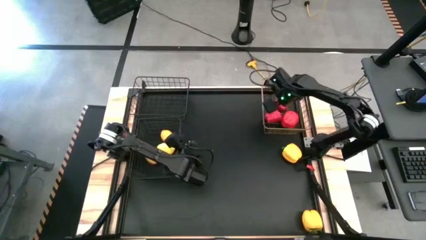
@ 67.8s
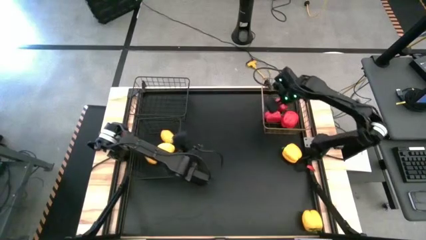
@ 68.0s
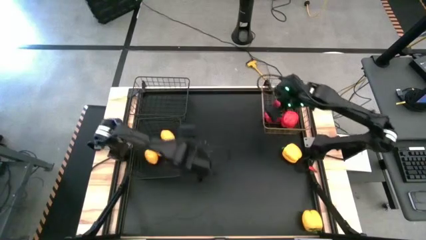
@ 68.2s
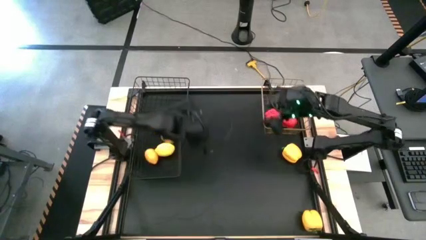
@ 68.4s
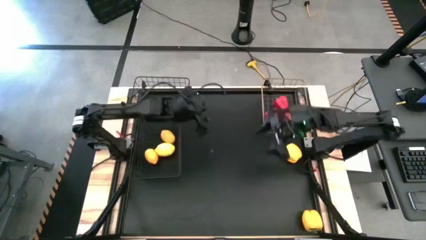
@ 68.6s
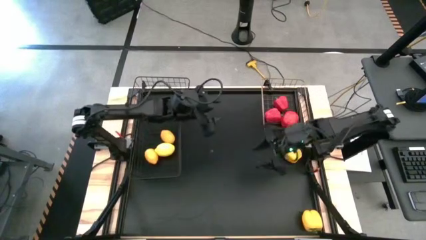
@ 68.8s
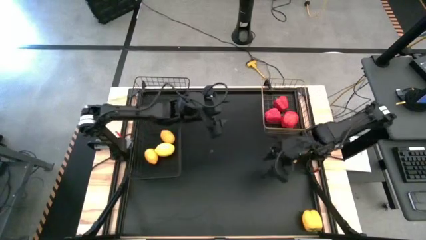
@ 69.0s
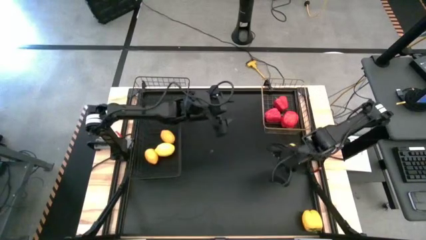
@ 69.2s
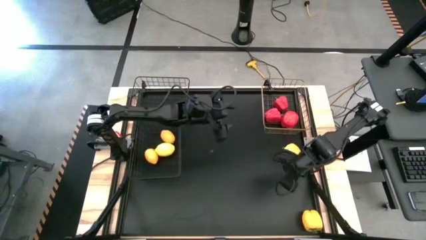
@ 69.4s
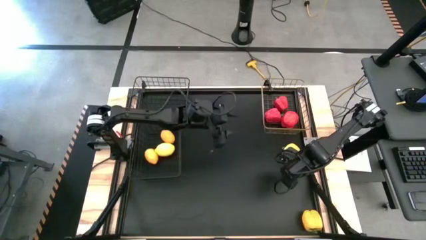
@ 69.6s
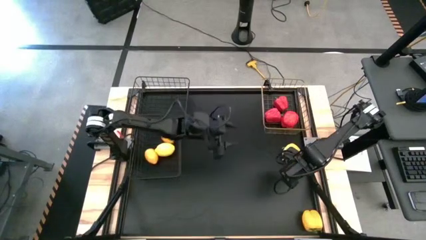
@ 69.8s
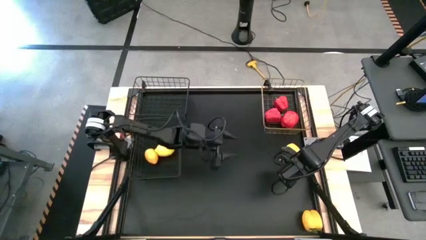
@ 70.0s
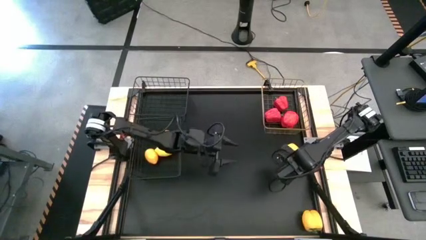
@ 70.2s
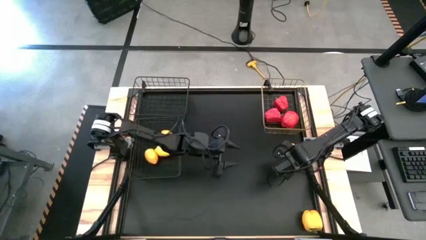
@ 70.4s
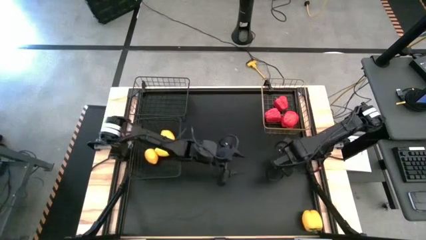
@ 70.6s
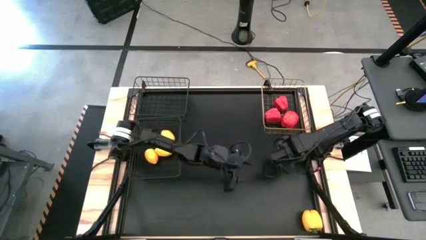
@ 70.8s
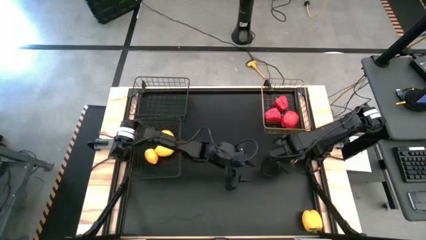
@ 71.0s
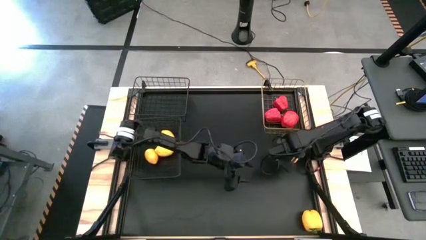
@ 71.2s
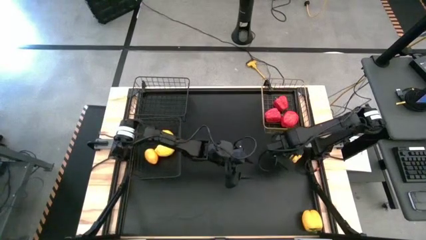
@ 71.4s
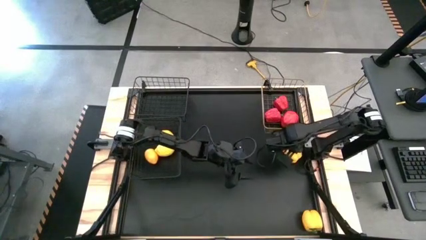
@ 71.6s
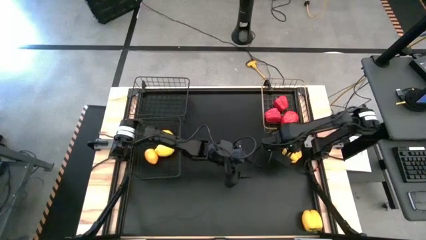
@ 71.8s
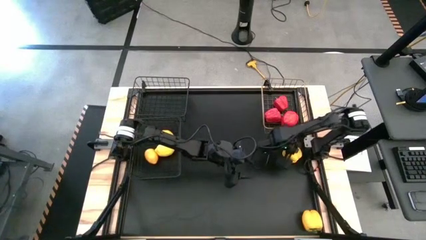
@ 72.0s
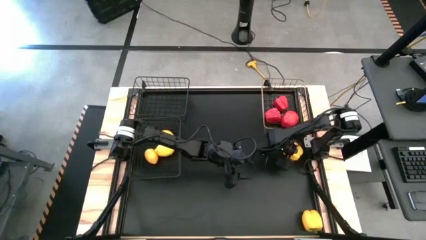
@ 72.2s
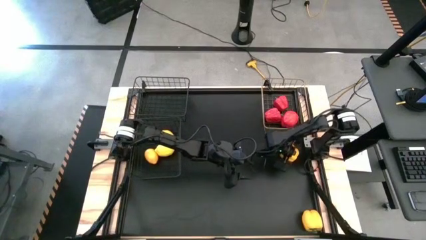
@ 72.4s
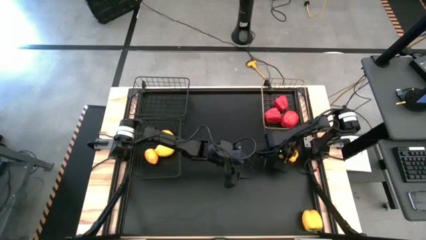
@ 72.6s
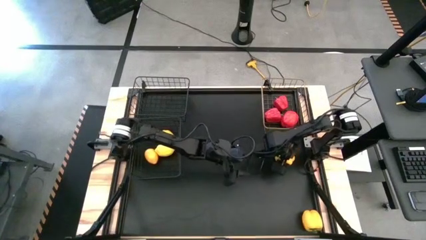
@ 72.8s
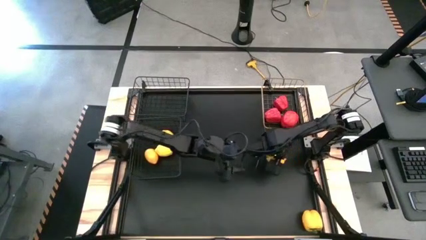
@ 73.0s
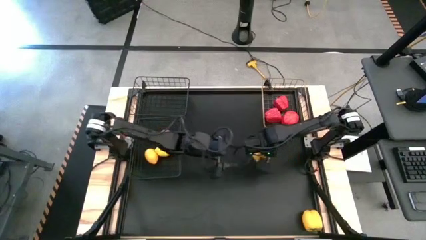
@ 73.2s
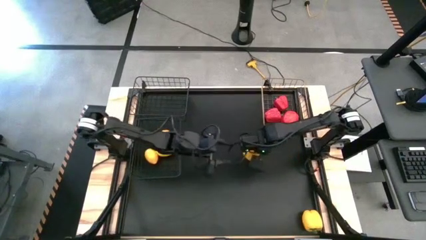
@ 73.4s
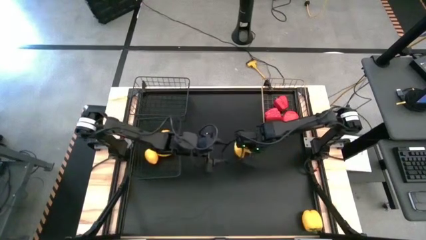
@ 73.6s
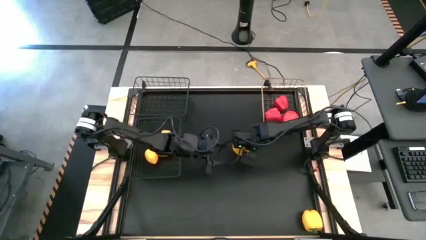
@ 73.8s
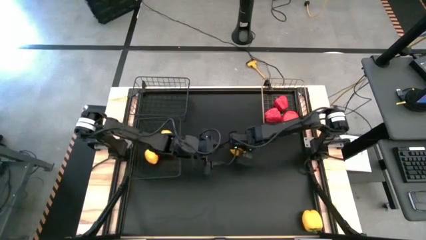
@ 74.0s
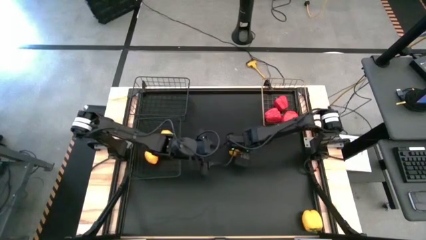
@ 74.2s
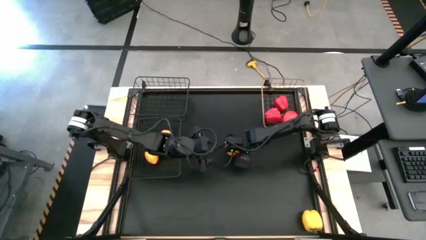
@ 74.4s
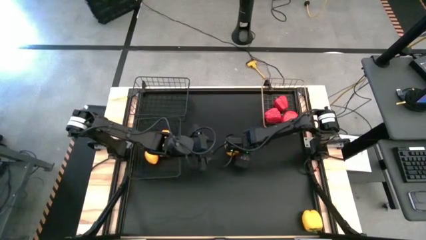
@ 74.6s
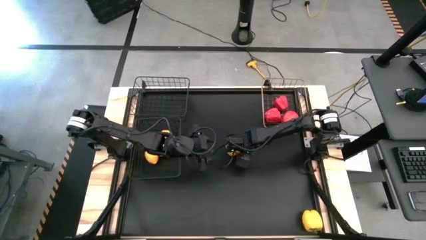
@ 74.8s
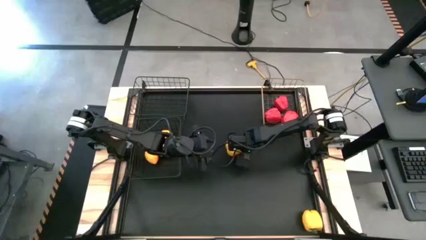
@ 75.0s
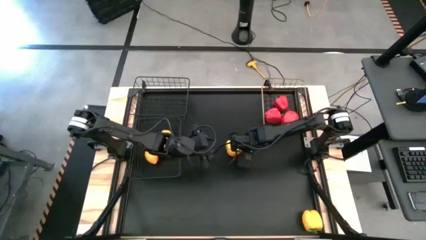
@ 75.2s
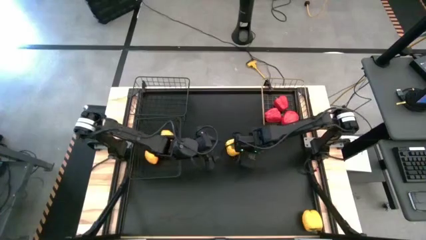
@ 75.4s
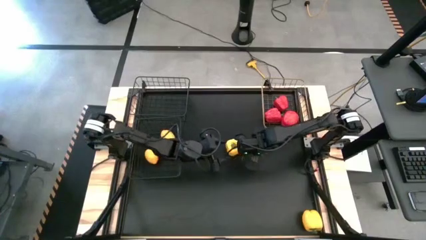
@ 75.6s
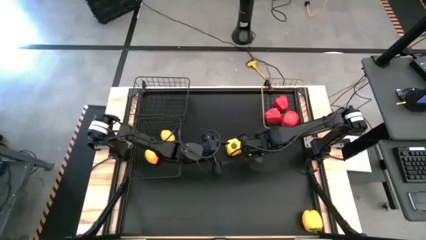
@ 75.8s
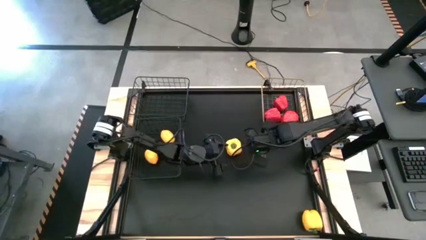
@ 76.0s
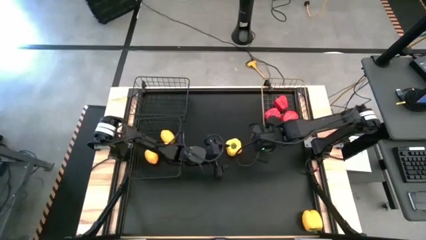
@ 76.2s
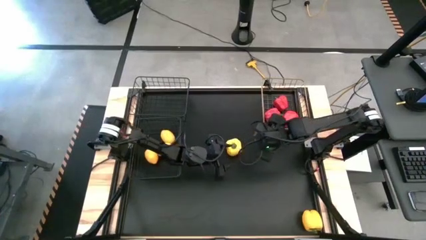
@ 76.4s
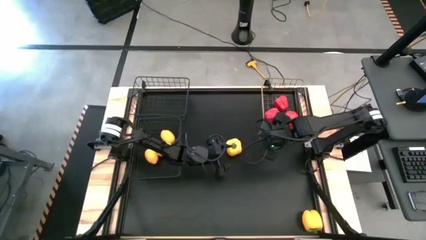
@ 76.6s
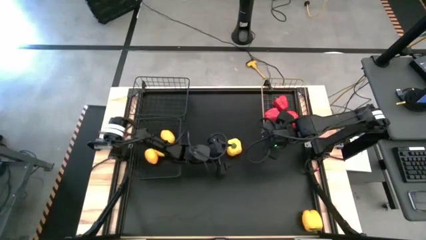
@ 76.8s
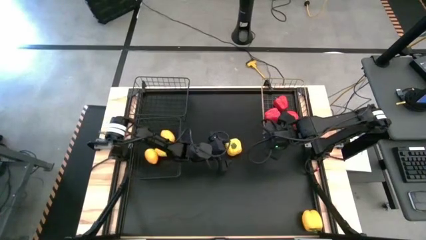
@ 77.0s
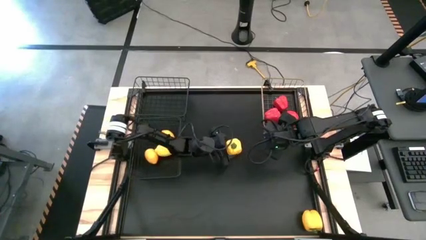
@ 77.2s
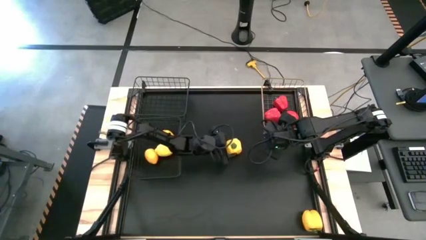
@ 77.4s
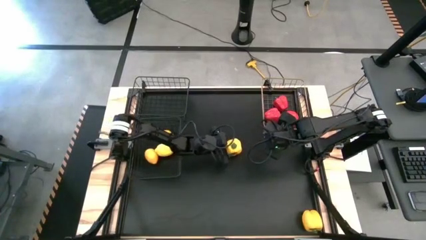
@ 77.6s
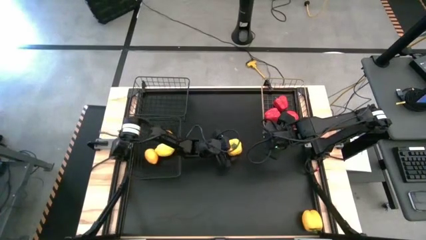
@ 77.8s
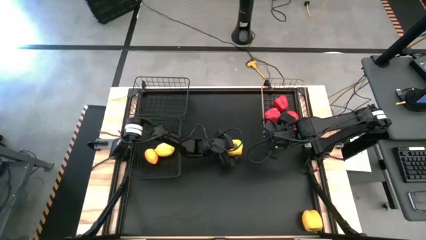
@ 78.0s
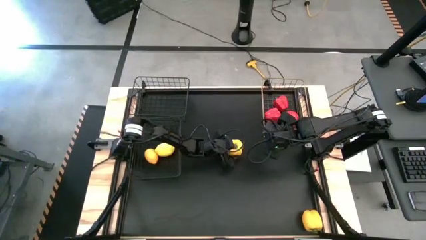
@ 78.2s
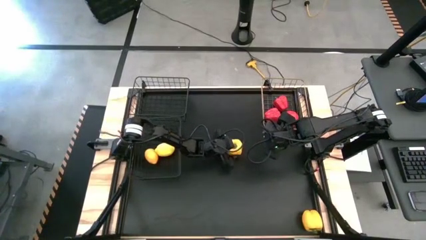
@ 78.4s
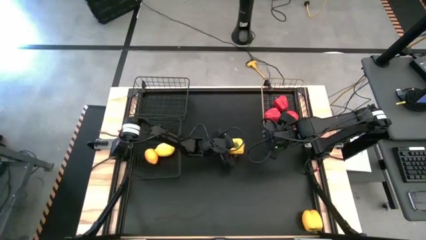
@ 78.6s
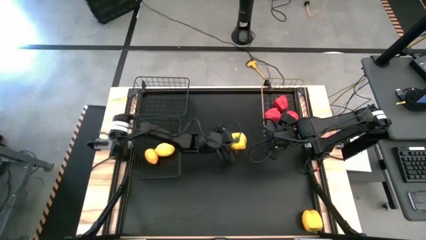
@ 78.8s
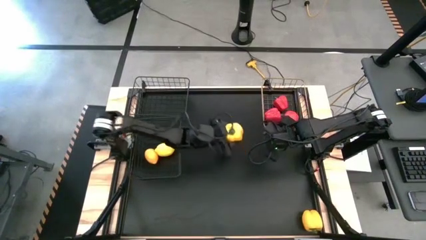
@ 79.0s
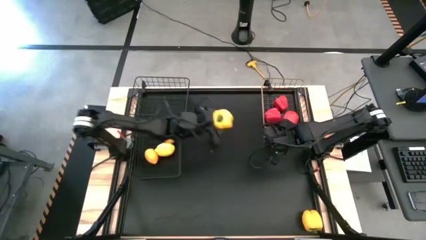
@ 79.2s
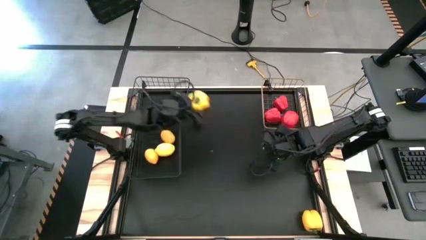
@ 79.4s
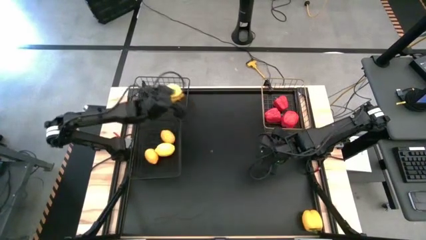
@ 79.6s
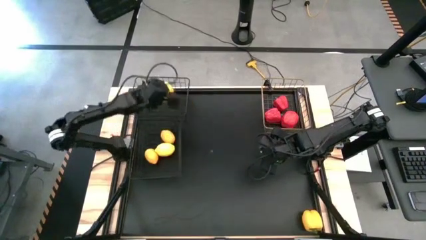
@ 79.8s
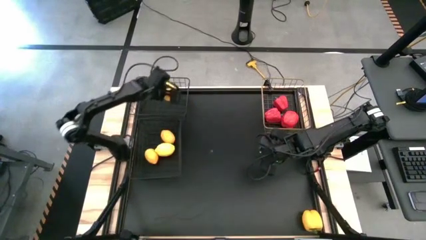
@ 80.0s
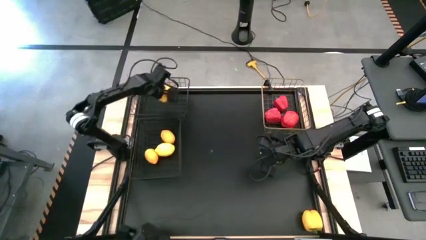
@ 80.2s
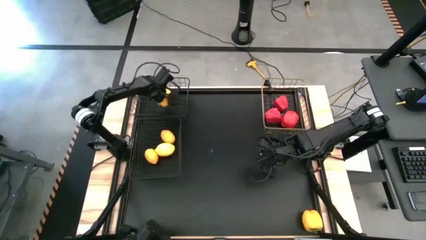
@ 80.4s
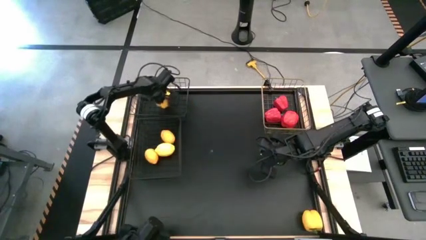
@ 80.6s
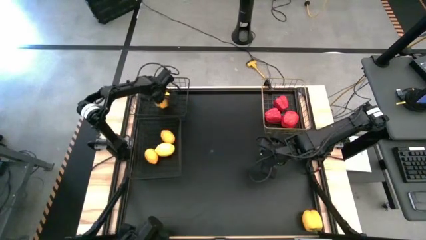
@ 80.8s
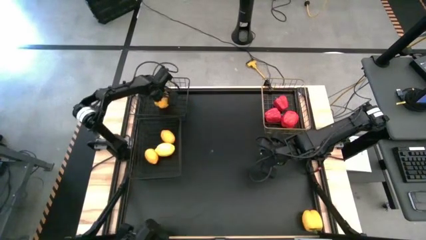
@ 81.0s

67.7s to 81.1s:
Task: Sort produce into baskets
Put the top yellow bell pepper into the top black wire basket

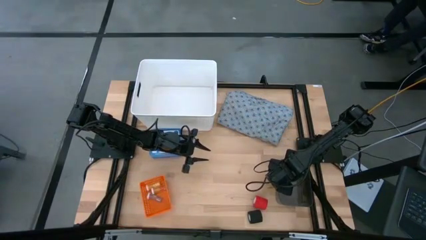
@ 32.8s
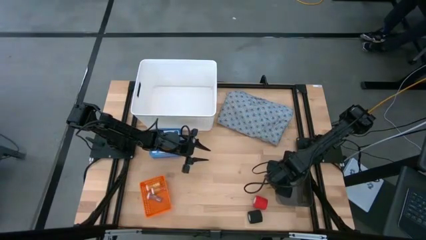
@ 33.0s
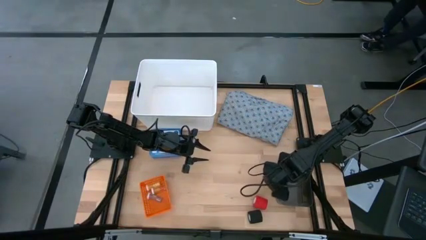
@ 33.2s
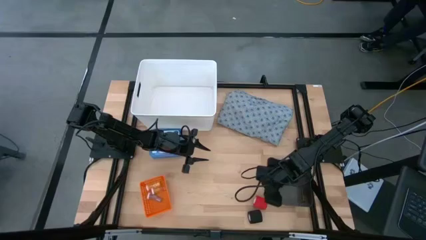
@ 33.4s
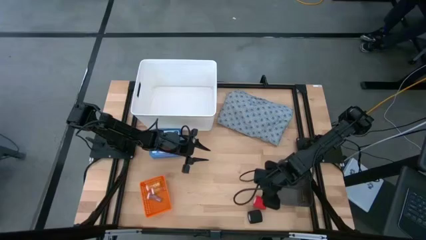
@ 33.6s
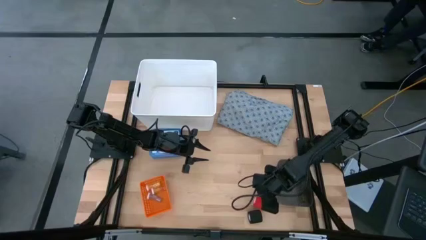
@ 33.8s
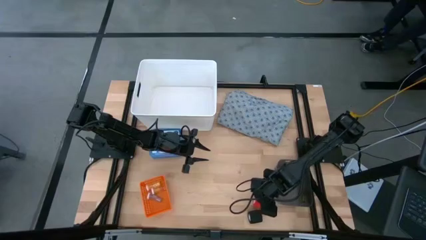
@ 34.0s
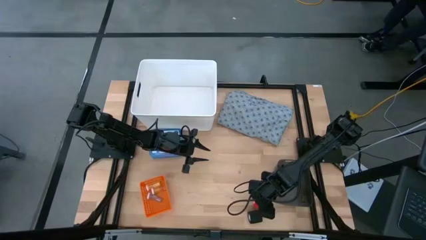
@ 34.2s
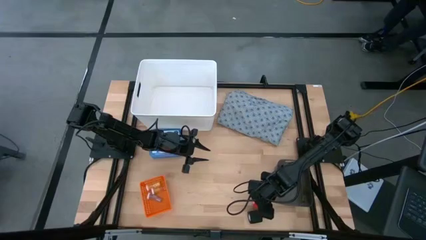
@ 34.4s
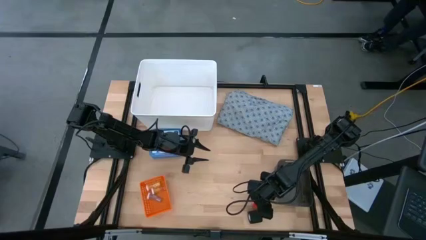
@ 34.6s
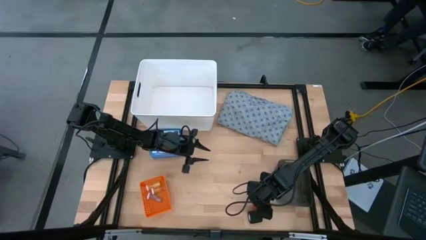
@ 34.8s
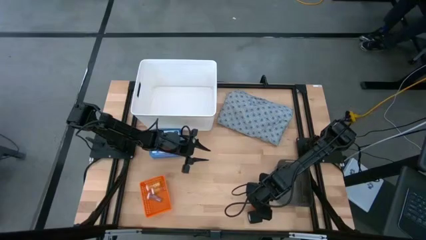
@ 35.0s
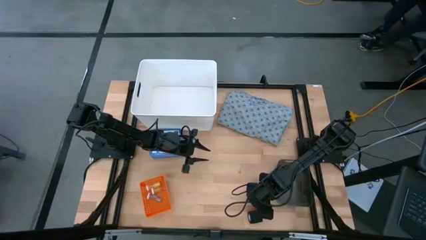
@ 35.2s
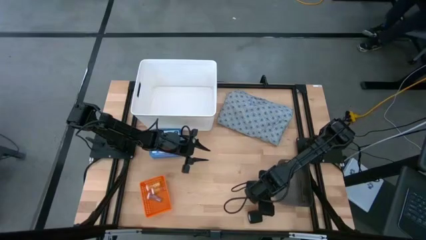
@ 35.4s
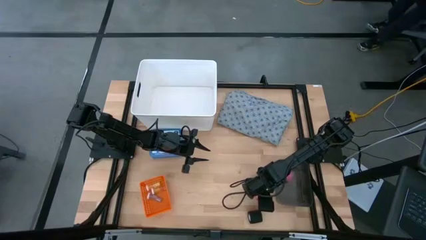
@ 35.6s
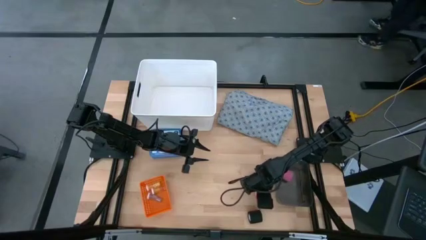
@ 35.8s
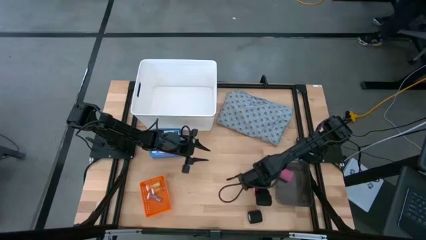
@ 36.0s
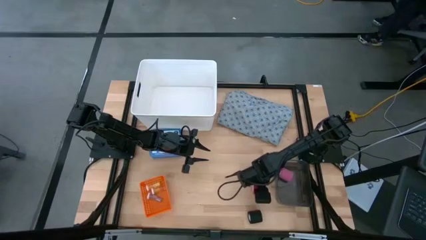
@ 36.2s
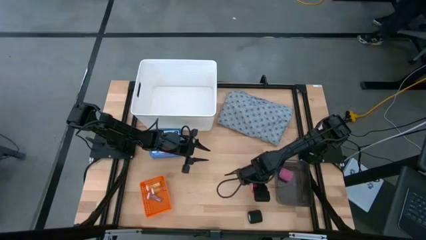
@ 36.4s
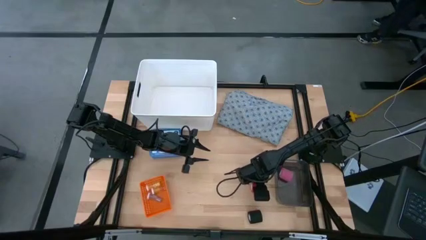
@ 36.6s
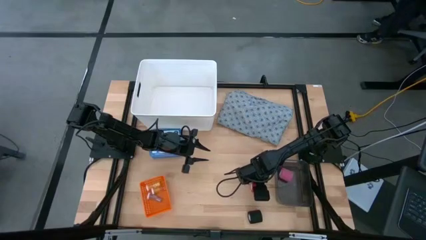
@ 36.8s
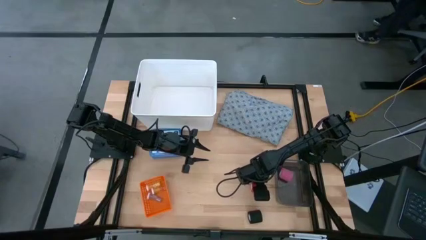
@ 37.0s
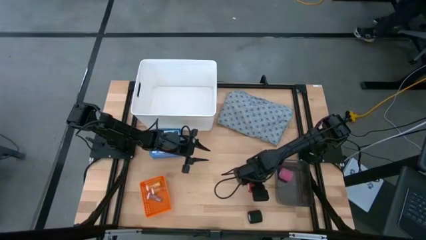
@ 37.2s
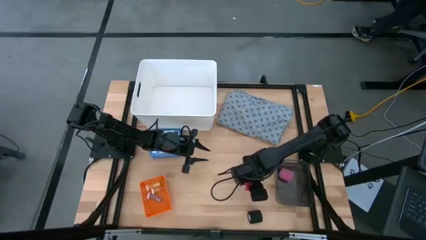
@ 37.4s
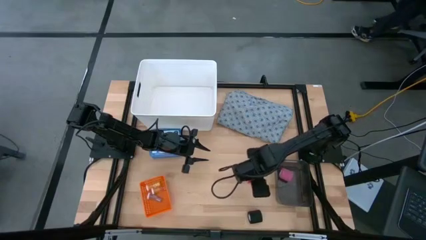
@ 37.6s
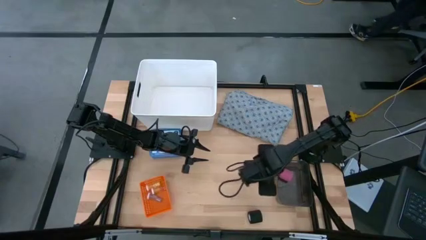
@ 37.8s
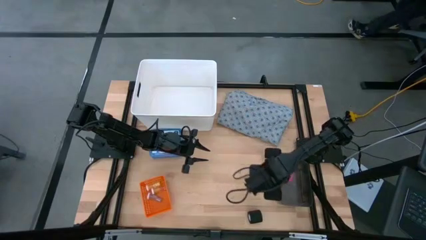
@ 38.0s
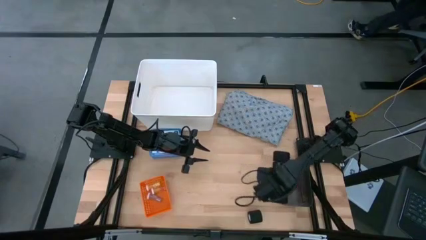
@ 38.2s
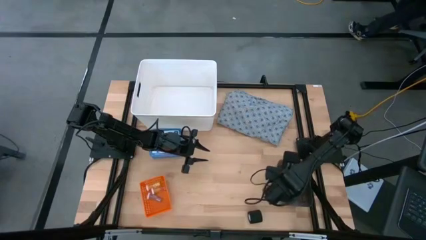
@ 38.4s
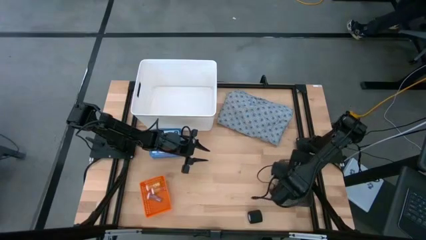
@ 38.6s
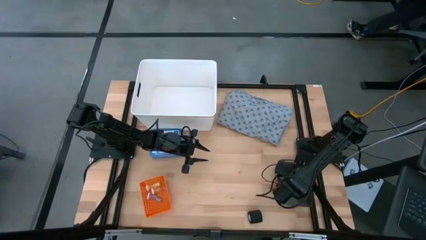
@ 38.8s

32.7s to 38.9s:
Task: Pick & place medical supplies in basket/bin
Put the red bandage into the black bin
